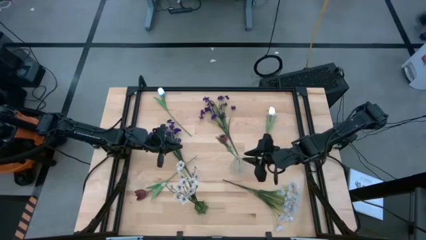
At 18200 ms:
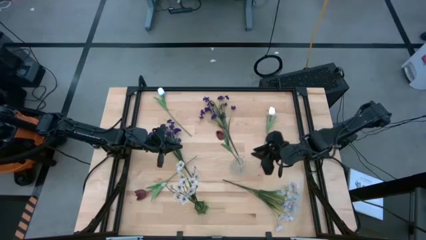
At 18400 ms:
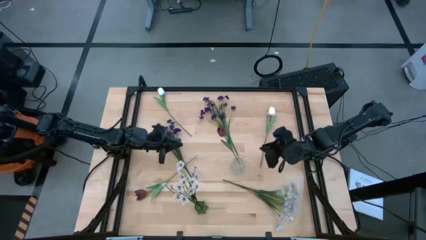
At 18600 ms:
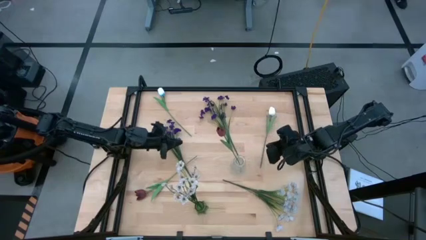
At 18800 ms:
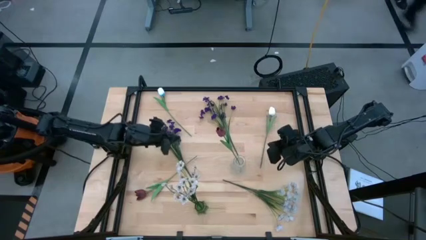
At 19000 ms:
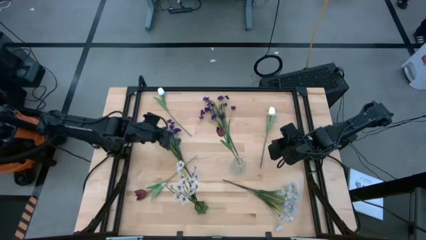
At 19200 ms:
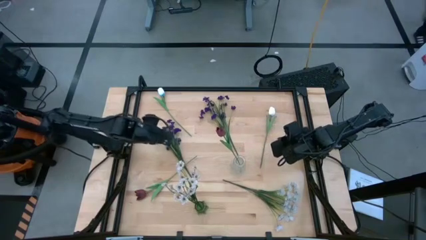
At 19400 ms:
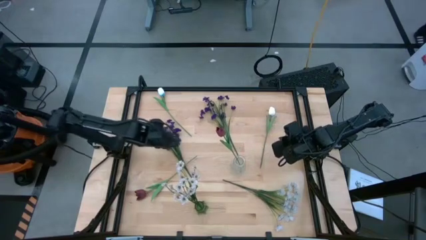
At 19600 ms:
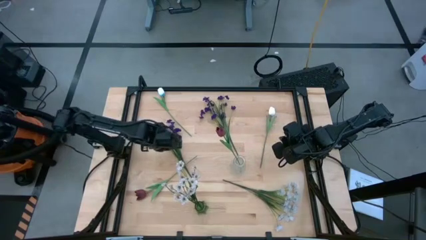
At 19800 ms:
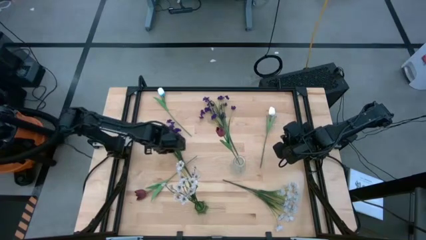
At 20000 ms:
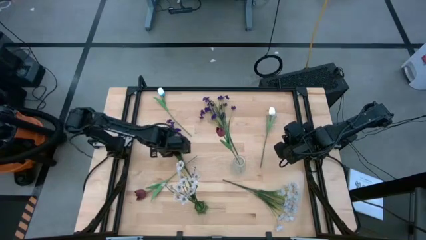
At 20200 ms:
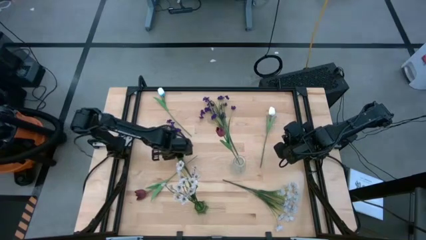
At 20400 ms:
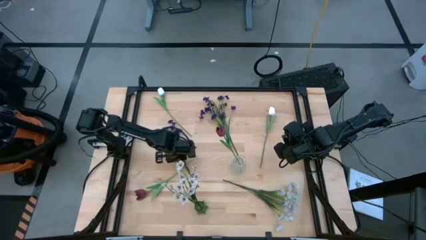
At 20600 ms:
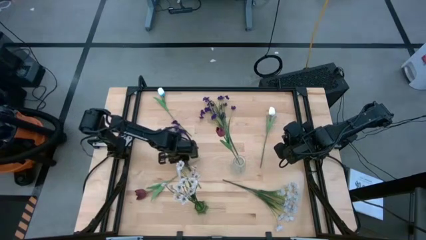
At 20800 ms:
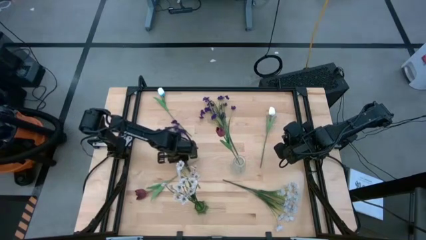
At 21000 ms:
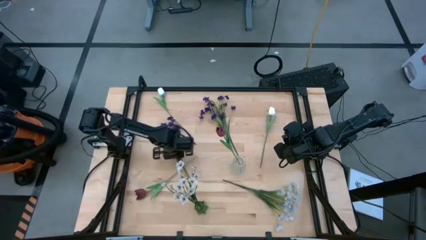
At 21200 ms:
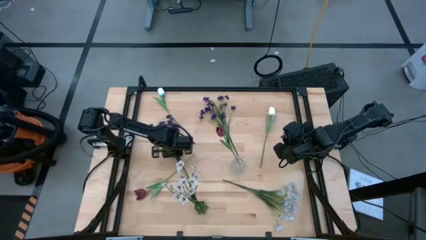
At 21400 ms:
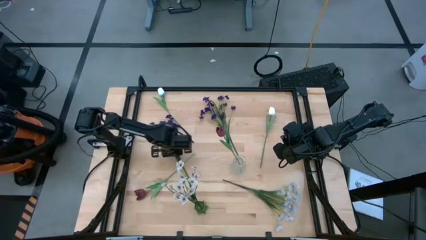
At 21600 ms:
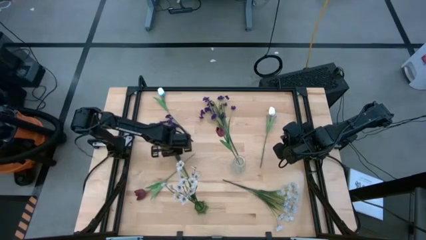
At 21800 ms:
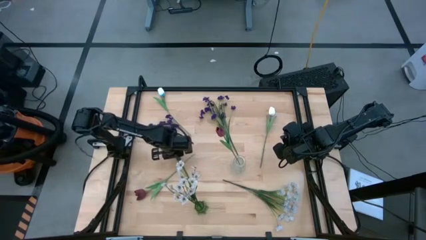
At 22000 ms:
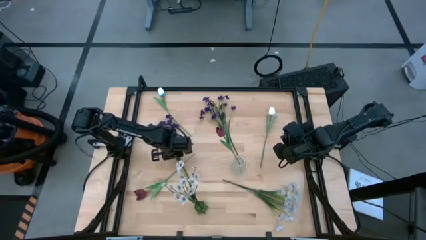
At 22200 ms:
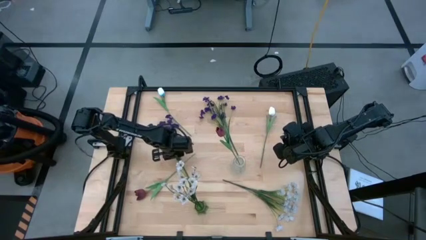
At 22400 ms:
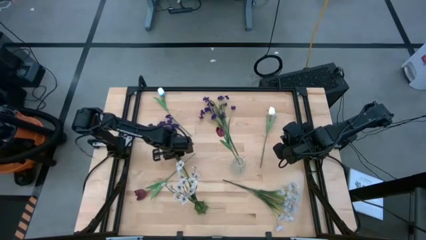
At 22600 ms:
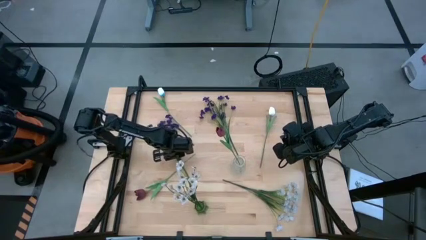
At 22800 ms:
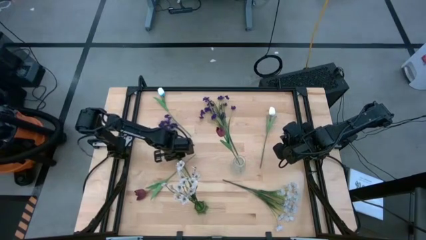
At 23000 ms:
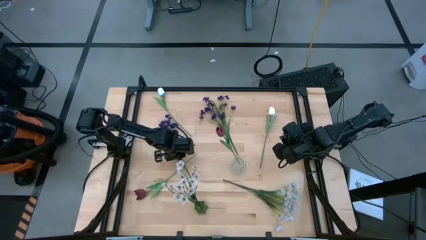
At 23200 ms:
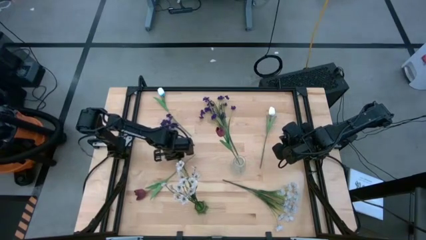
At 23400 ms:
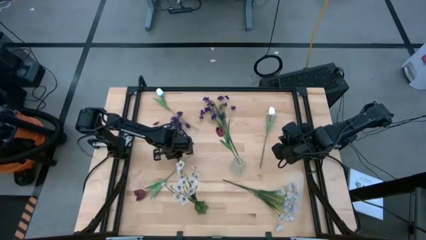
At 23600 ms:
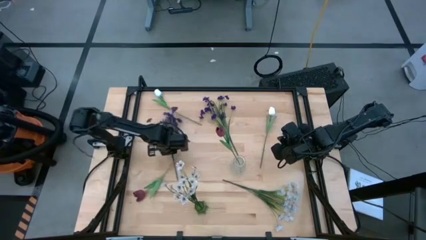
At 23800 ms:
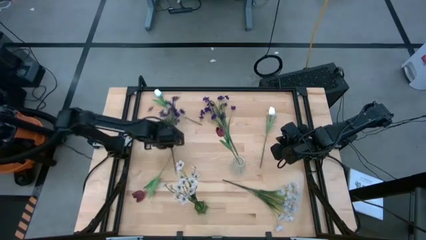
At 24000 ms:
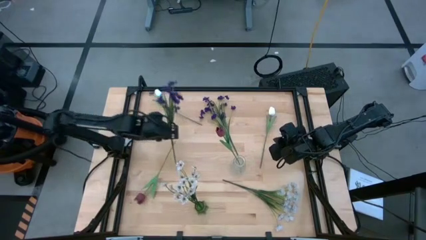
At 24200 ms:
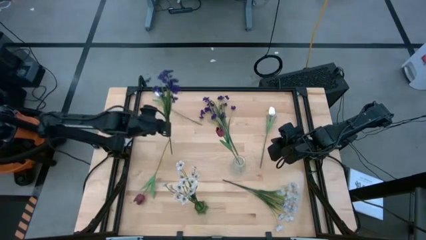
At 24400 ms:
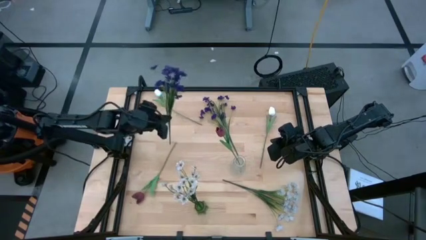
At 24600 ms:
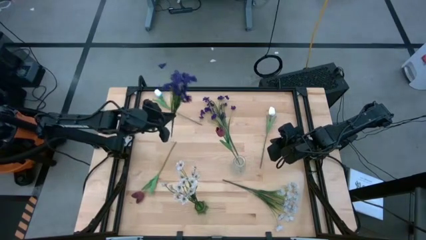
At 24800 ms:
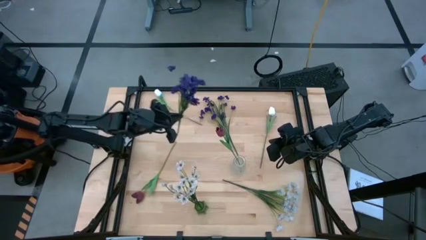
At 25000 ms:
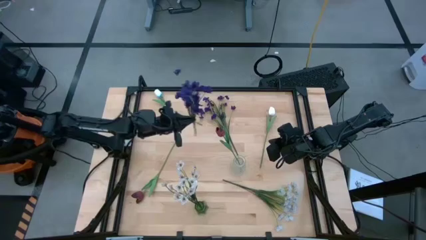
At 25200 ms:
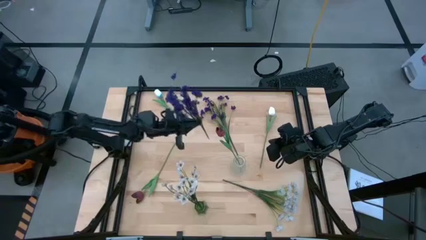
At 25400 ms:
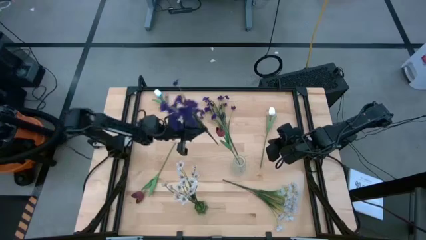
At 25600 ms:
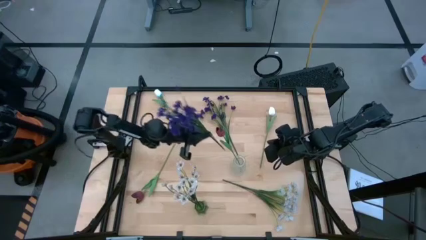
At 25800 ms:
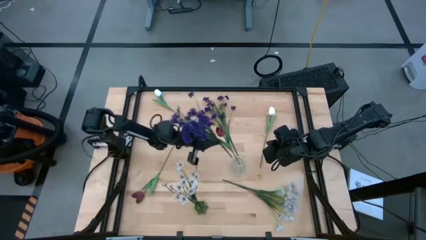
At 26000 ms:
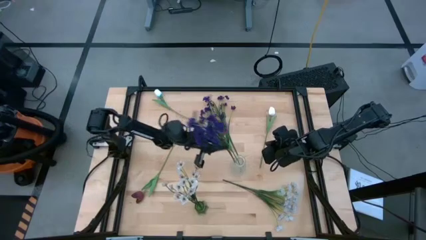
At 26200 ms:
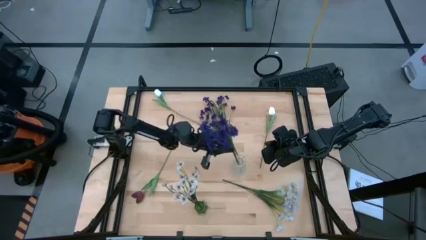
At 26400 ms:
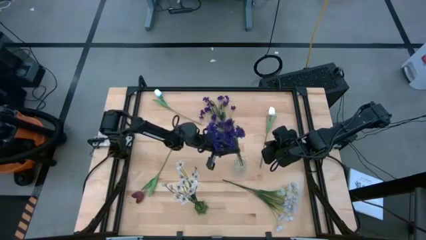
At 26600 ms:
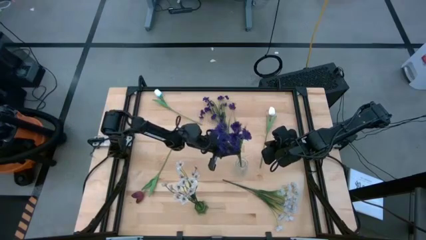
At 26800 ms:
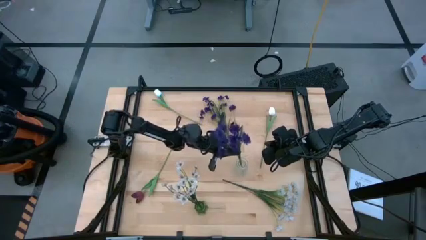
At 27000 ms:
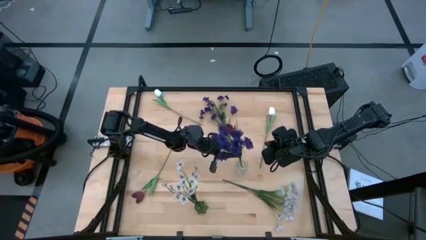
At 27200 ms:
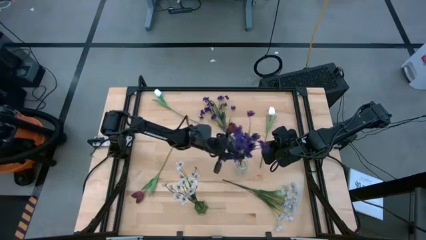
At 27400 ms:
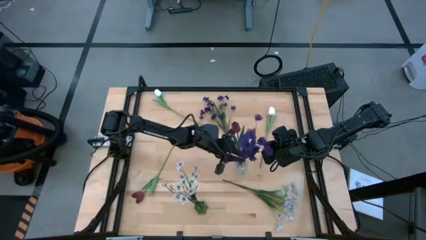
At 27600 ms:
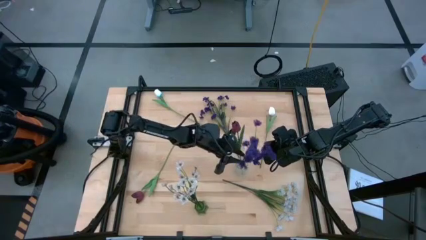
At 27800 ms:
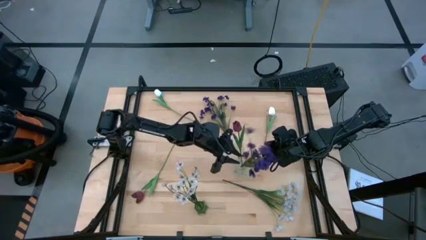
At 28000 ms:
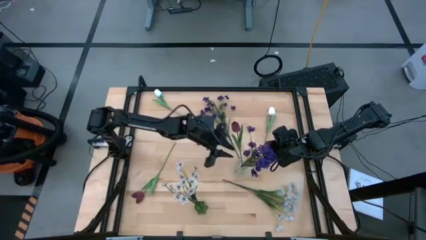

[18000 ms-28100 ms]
Task: Sort flowers into vase by color
Put the left violet flowers into the transparent vase

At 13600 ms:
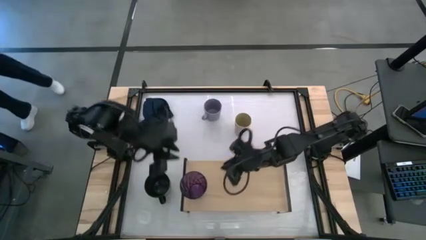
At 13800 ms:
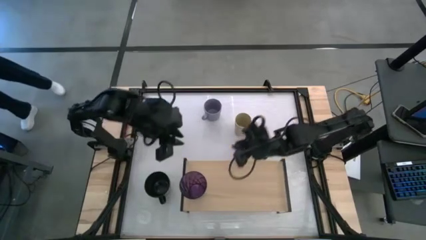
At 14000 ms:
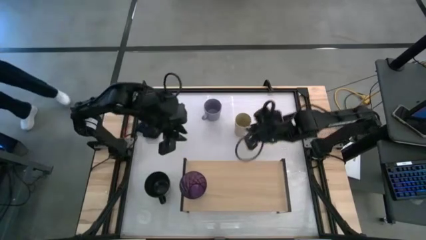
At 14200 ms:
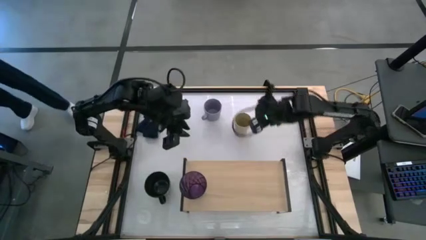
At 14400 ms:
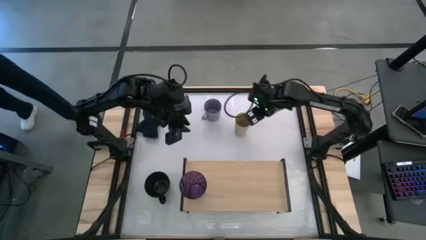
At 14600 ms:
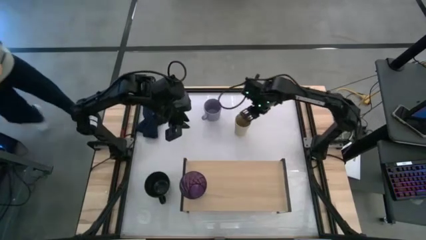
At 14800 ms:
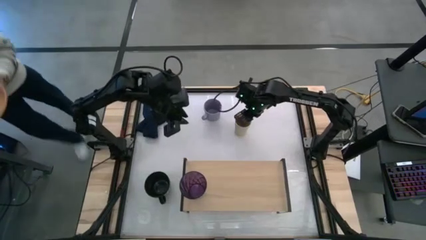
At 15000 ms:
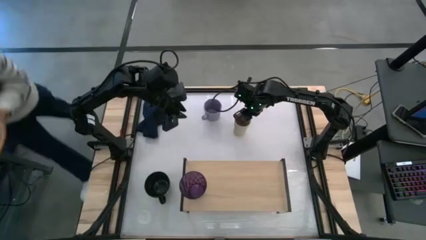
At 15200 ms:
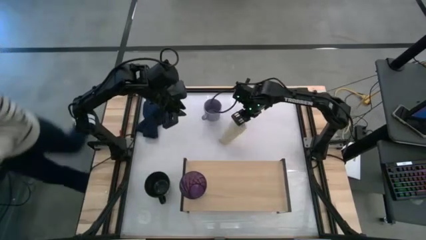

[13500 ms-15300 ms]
Task: Stack small to large cups/mugs on shelf
Put the yellow cup on the shelf
